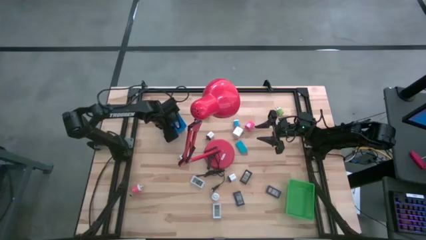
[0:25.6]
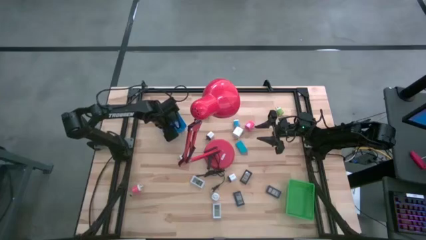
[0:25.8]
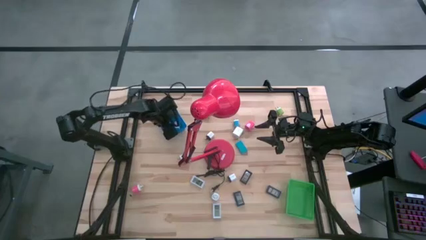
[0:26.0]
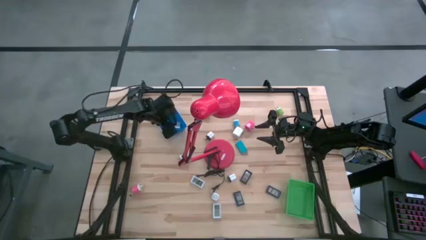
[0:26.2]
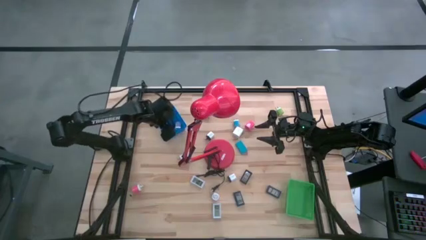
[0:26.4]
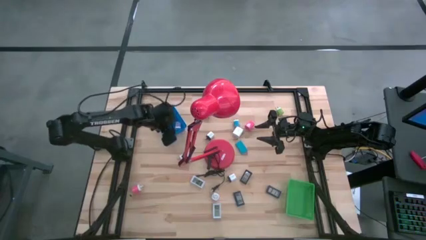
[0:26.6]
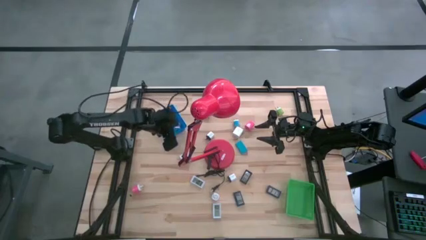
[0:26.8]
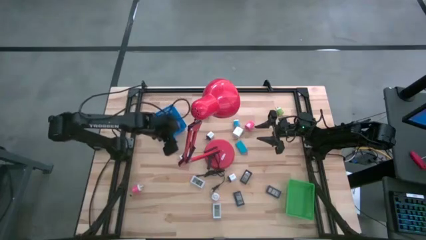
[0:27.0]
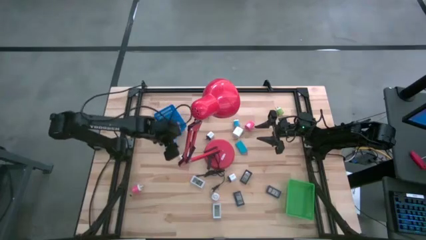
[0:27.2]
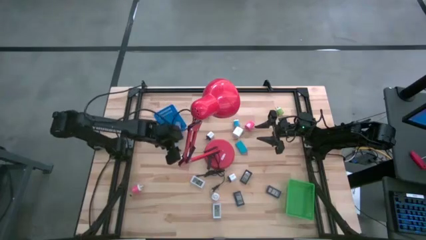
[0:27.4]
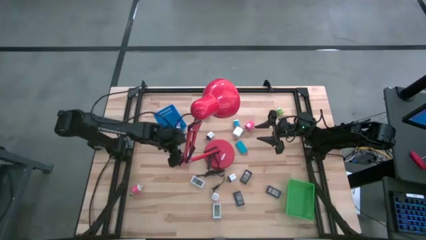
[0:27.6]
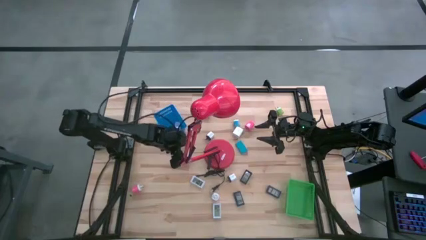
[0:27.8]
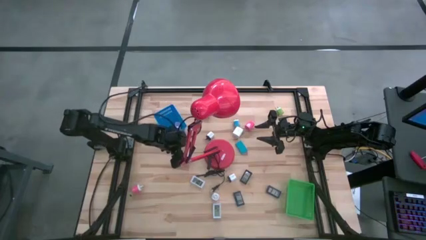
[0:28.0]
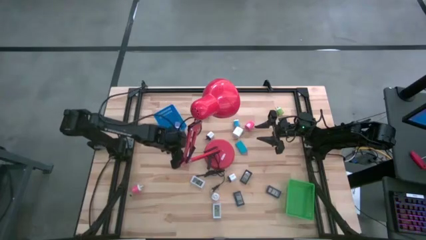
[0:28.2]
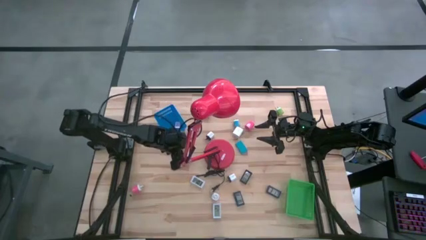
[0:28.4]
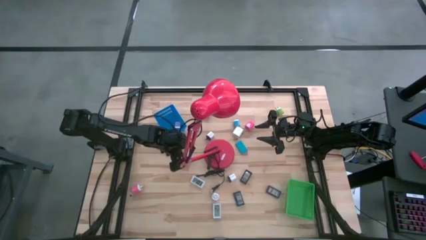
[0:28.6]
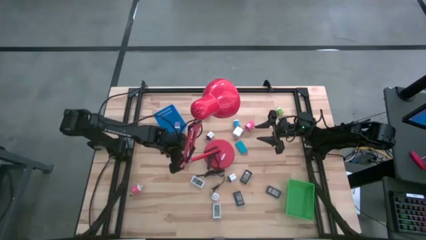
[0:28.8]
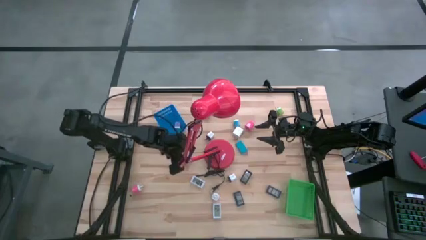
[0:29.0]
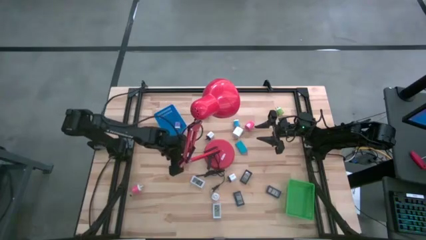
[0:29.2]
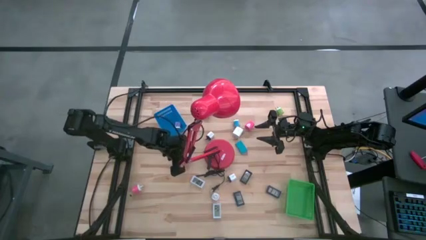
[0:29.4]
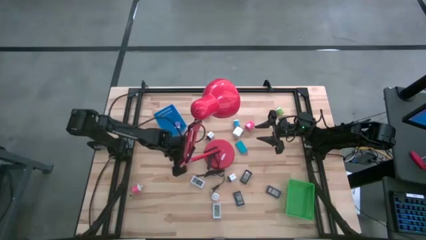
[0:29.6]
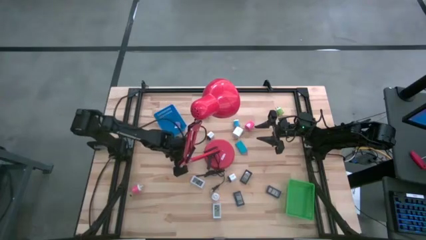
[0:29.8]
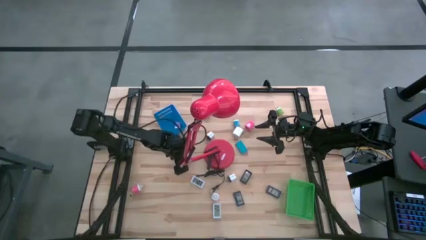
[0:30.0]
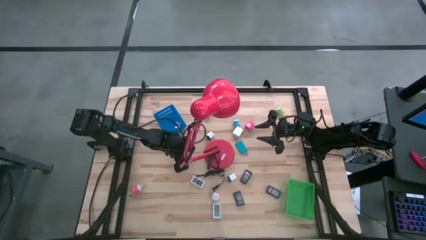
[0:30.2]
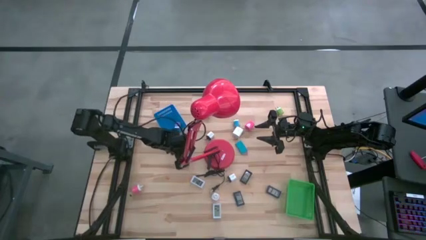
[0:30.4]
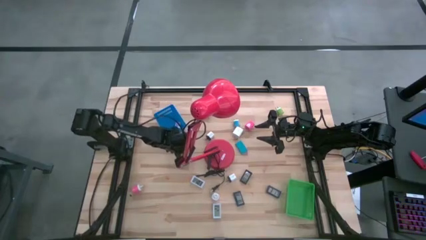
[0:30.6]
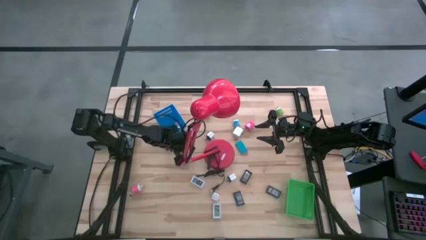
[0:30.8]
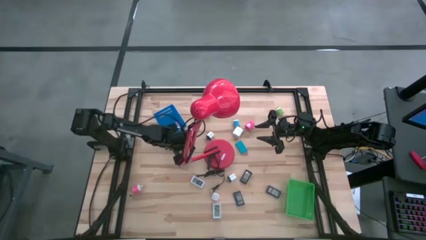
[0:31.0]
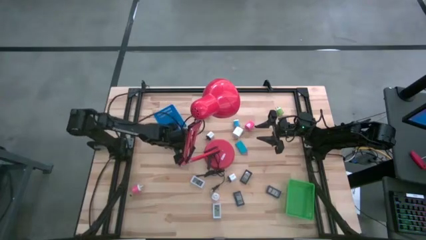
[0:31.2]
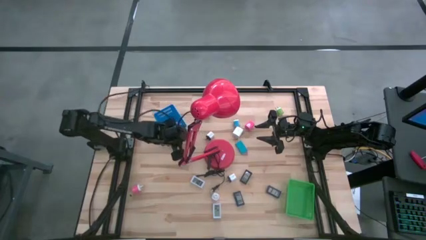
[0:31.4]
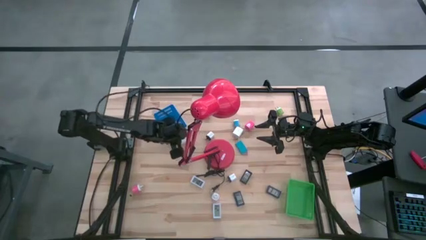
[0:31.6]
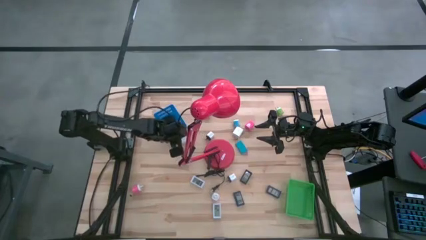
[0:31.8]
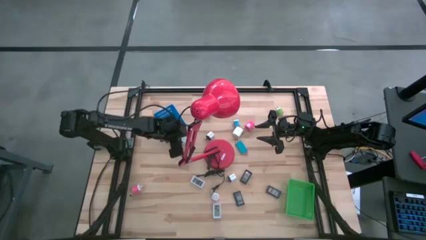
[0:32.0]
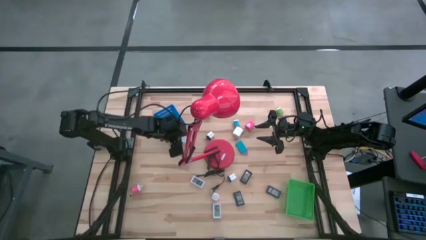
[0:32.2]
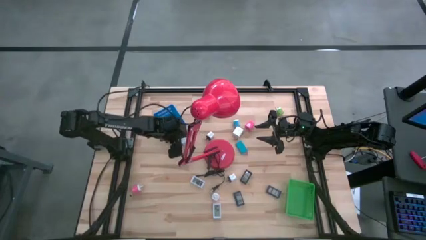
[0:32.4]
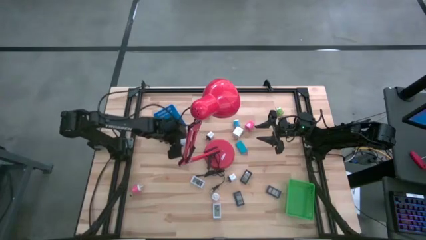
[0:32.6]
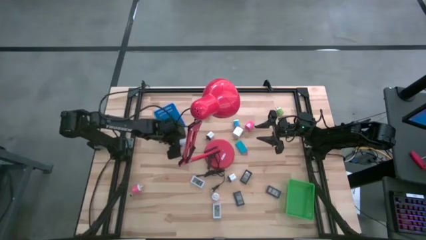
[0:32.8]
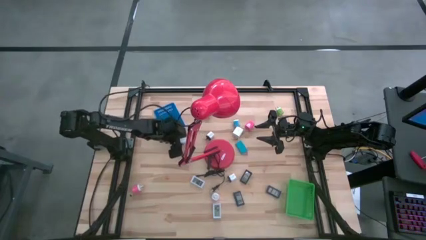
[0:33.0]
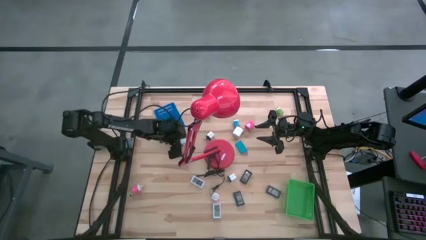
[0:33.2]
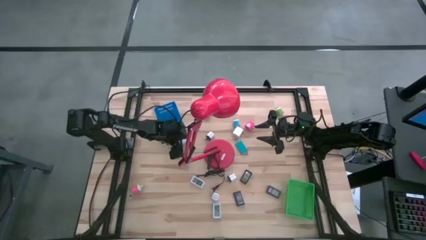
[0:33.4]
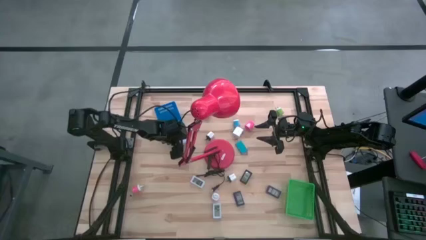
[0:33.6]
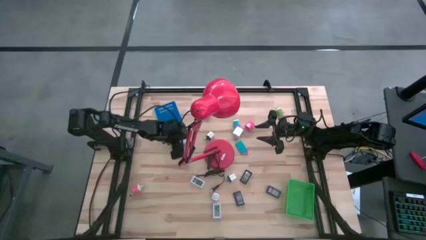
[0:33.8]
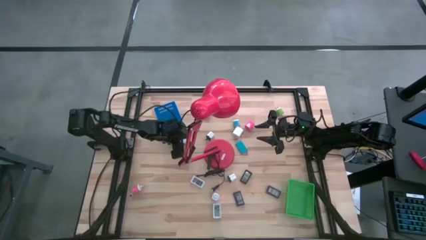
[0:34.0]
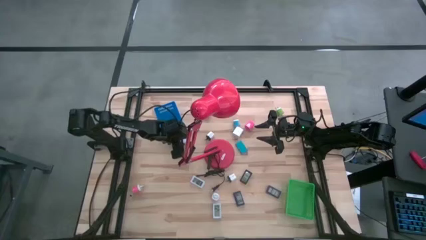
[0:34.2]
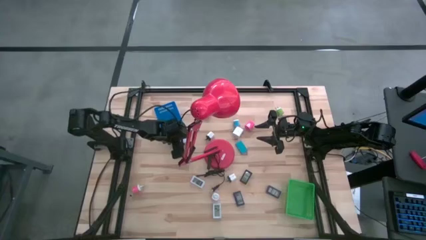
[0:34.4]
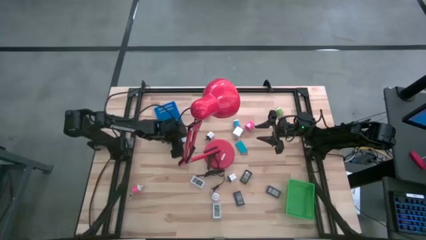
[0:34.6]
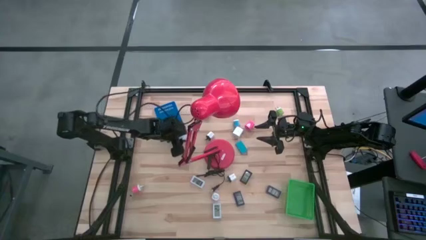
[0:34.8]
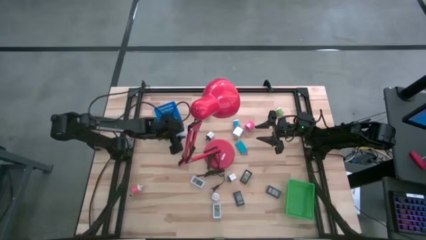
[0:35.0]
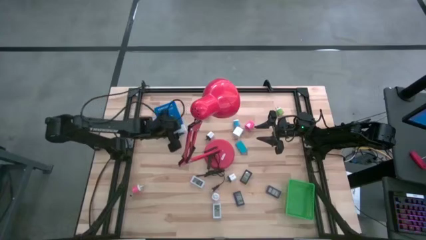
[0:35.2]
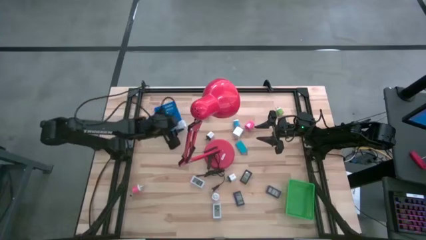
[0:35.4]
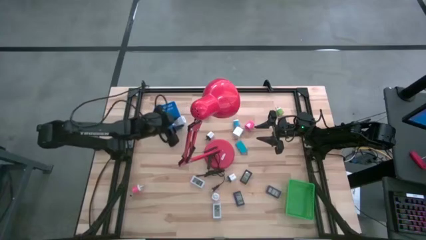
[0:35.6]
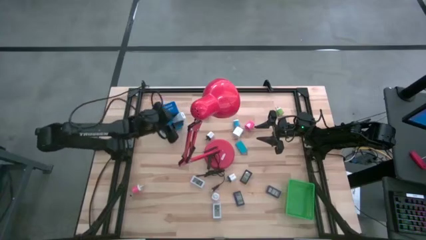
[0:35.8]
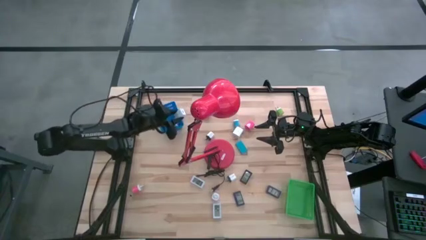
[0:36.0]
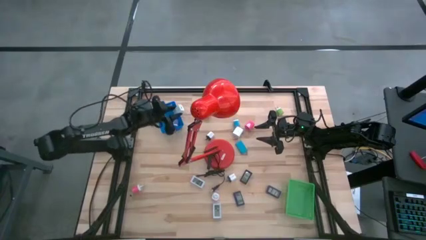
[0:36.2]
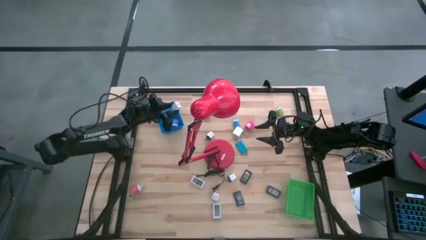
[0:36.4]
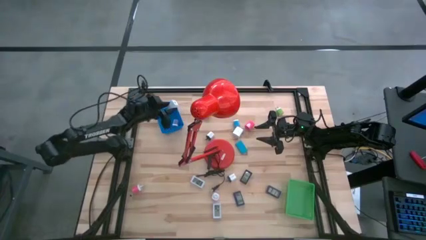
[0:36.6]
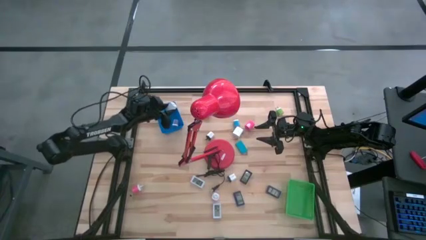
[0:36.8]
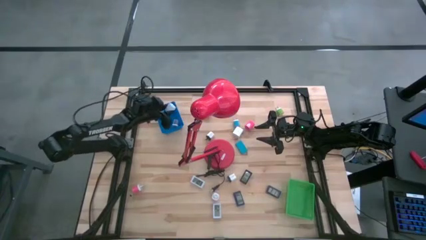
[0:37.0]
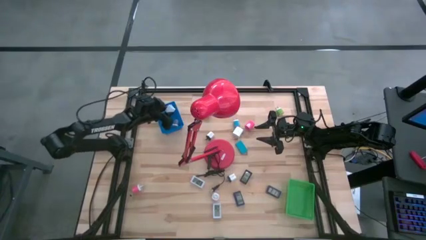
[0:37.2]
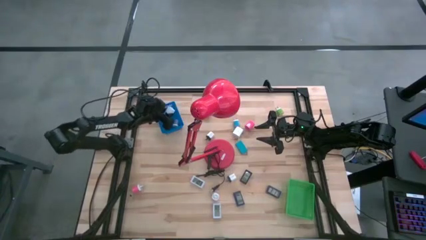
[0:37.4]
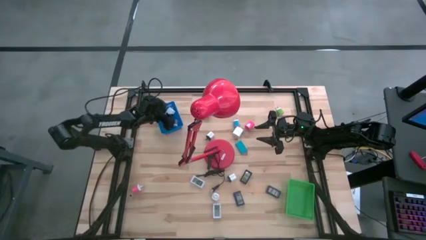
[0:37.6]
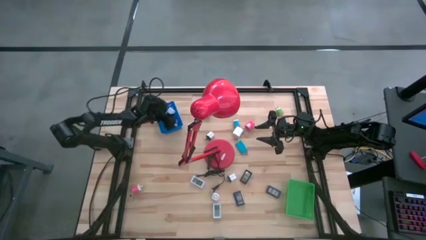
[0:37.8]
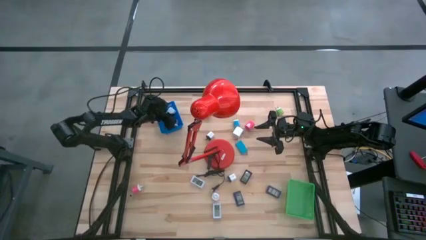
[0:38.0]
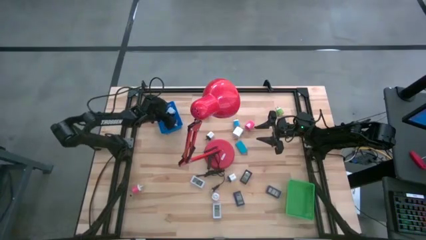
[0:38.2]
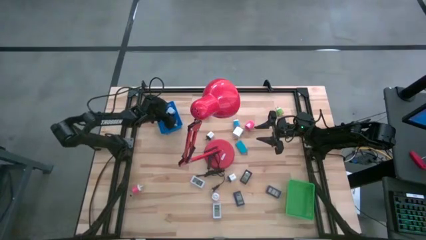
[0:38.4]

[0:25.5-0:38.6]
Task: Pick & Place Office items
Put the left white charger adapter into the blue bin
